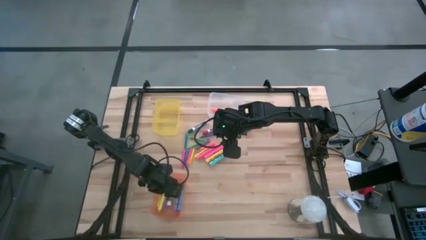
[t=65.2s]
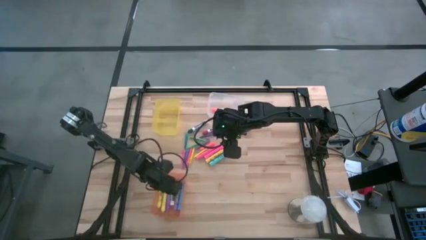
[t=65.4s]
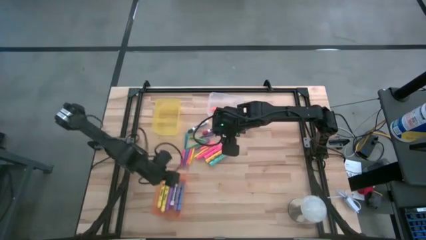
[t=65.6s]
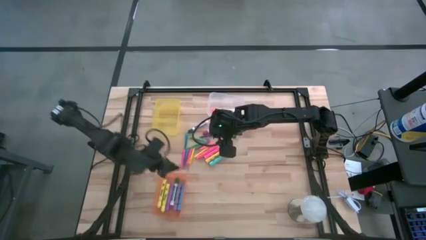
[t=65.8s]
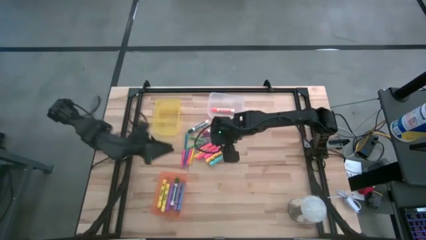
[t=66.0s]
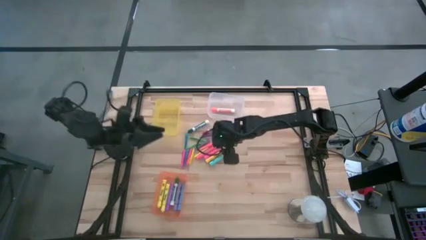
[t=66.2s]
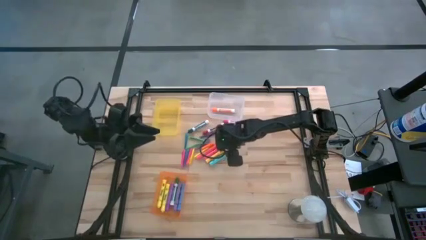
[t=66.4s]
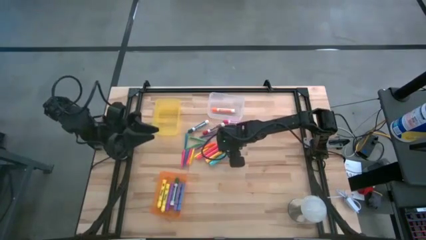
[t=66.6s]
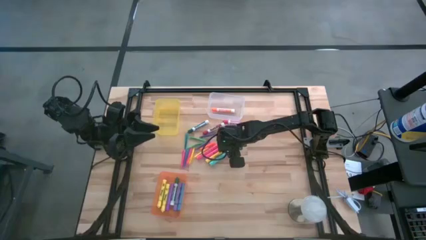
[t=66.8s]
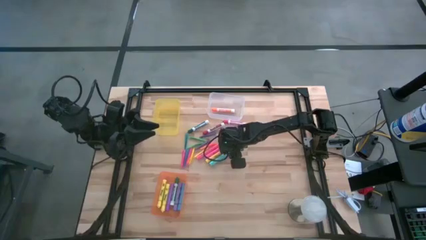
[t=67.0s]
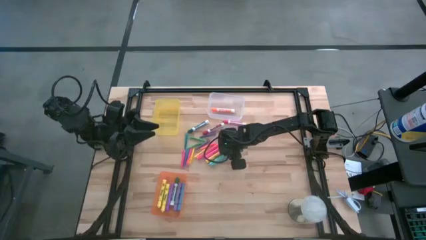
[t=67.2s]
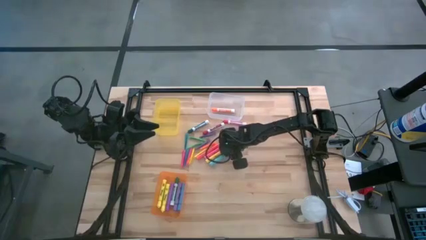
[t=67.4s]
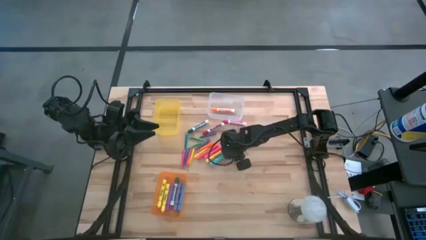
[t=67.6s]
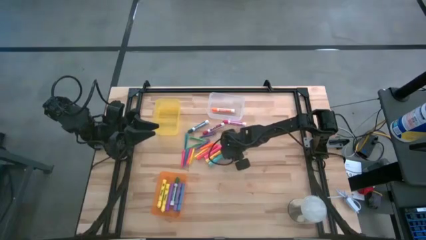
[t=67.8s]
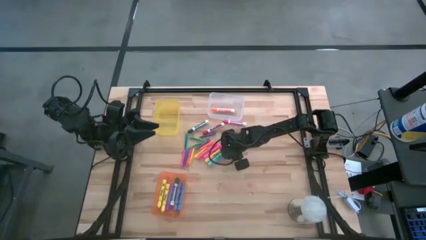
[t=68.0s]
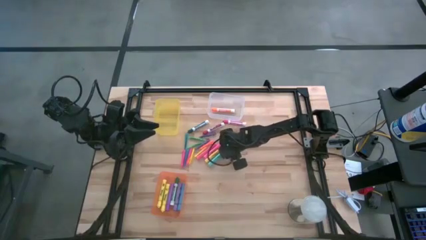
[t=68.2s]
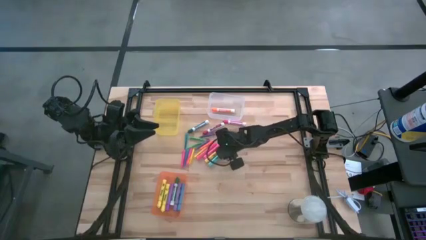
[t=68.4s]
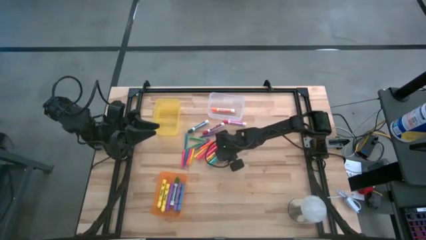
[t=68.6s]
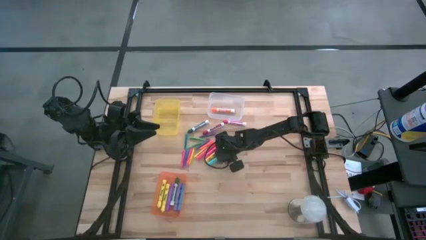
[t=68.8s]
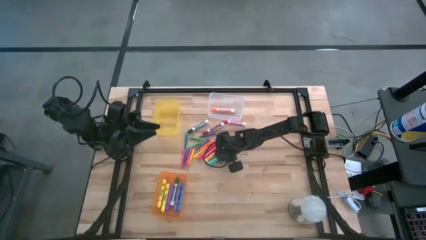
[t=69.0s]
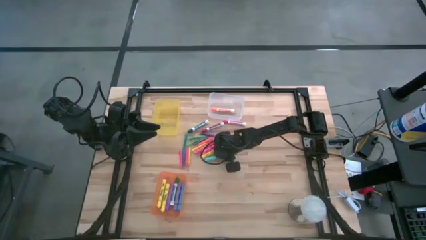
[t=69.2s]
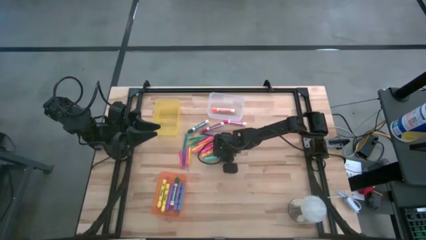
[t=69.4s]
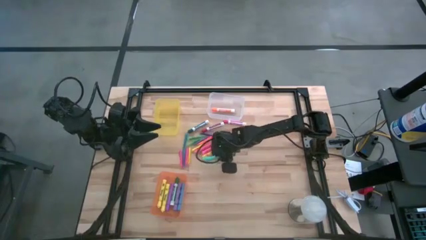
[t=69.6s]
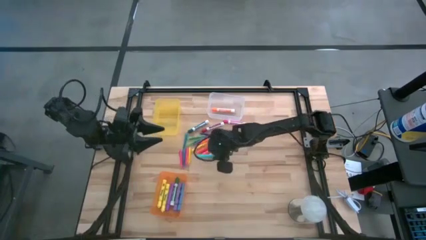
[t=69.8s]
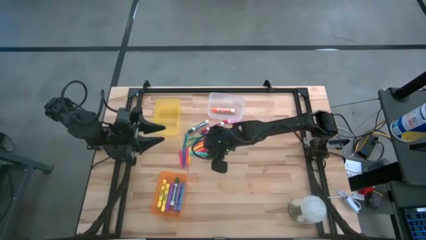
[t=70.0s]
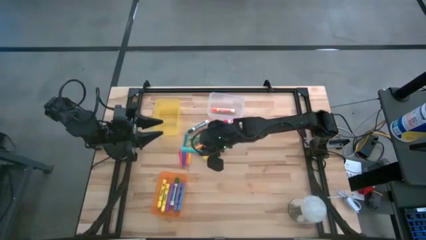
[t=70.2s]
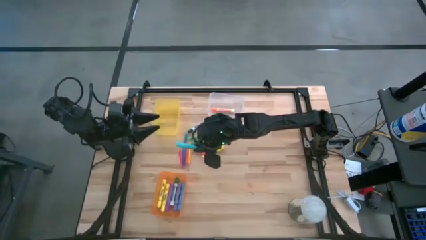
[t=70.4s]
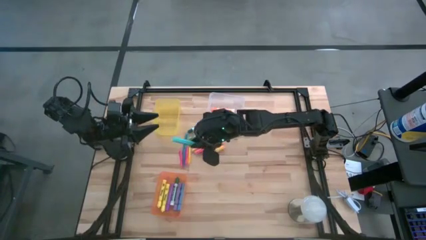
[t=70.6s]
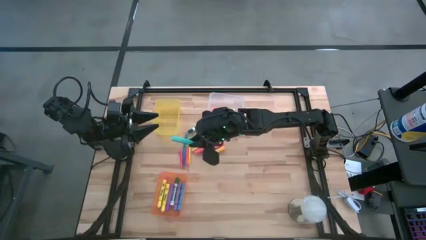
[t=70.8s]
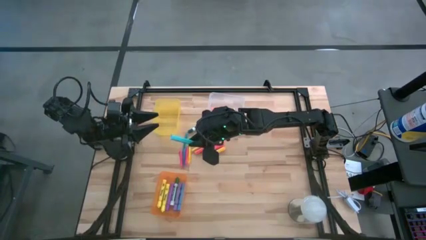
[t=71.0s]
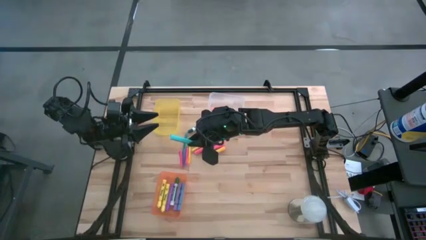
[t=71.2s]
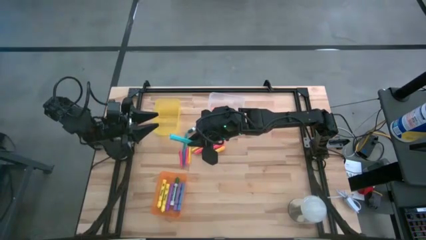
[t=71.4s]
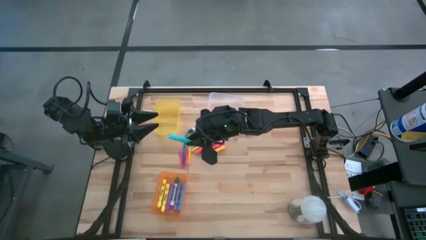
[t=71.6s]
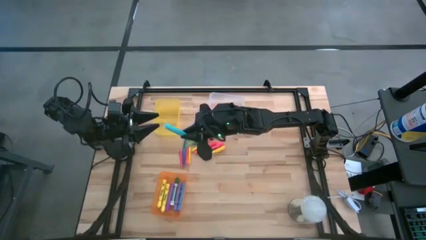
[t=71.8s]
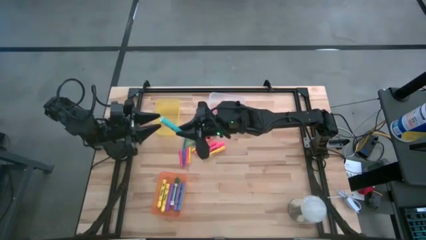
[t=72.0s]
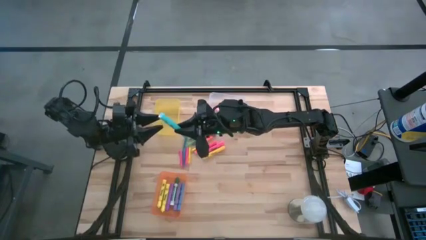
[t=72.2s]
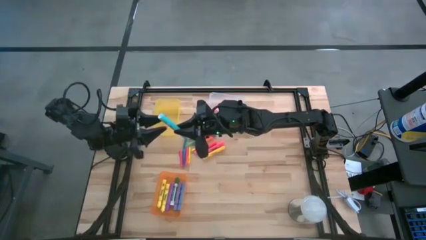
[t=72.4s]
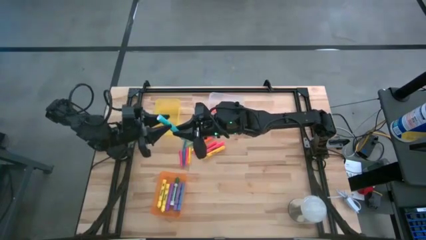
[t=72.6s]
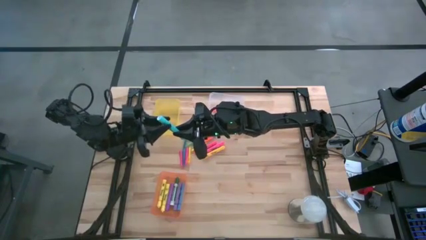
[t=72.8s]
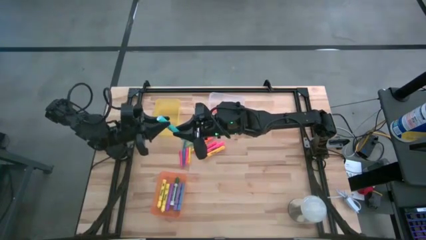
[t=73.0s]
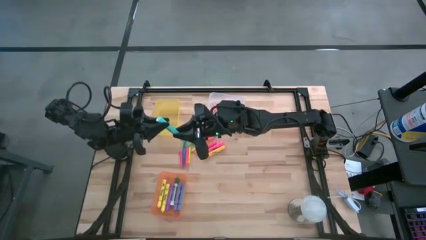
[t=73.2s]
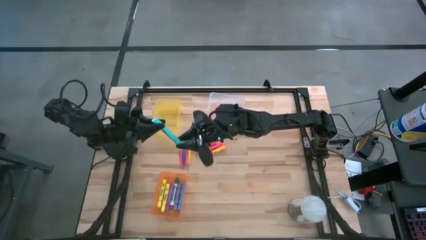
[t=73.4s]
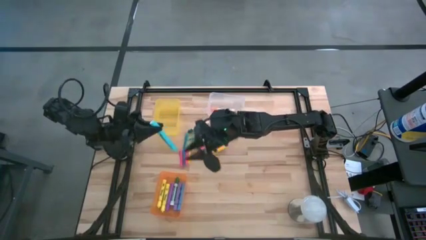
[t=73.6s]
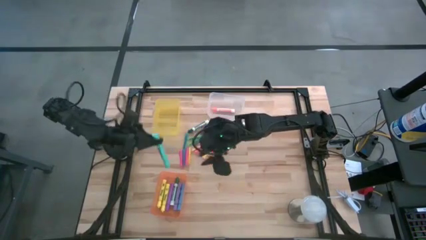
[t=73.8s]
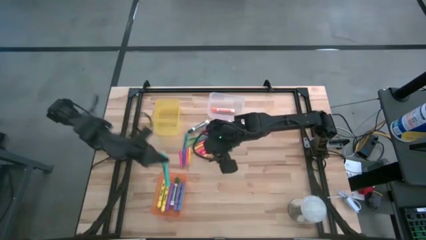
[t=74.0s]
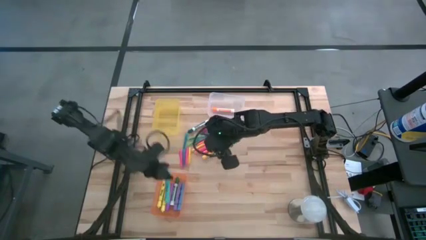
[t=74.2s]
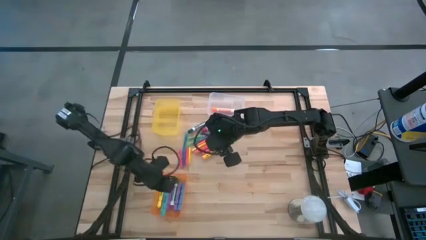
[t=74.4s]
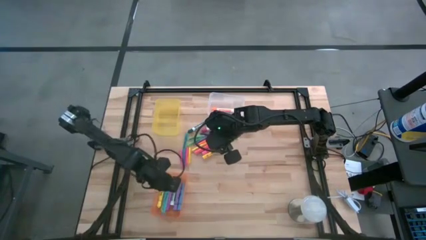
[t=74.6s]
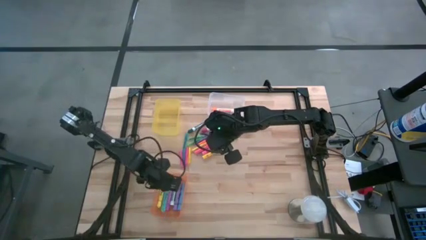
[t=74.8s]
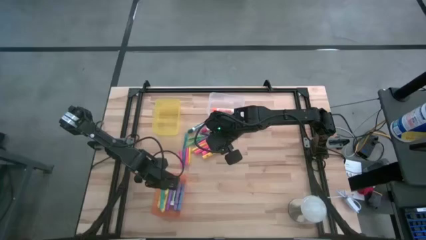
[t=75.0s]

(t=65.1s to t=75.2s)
Task: Pick & Place Markers
Put the light blue highlighter into the orange bin
